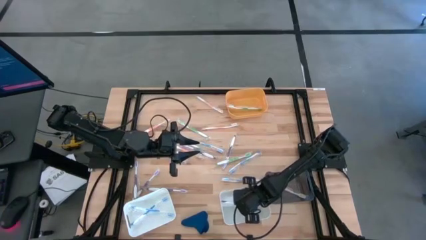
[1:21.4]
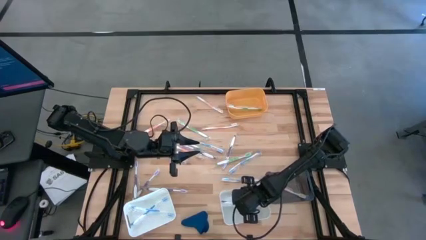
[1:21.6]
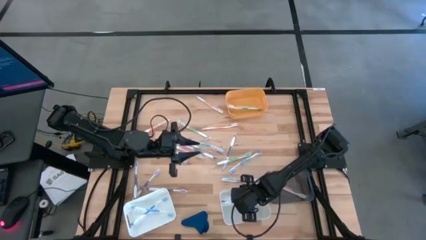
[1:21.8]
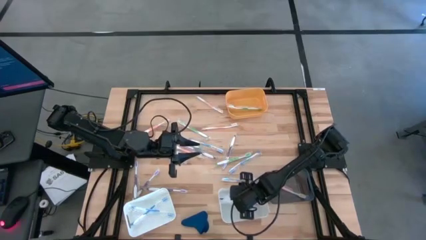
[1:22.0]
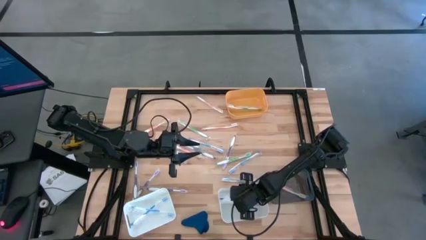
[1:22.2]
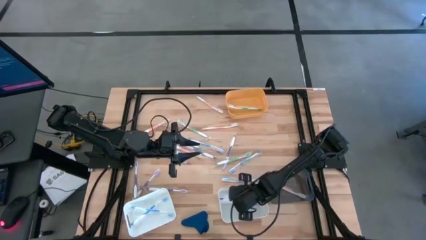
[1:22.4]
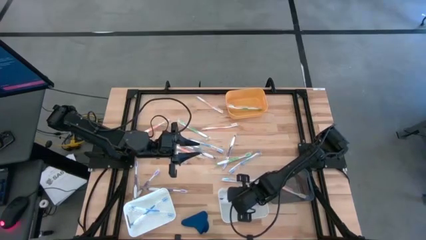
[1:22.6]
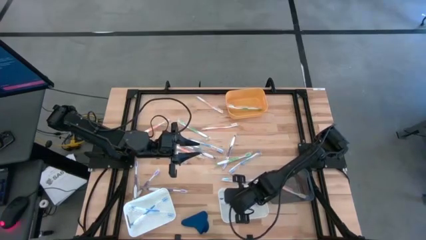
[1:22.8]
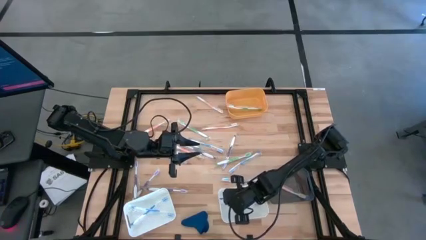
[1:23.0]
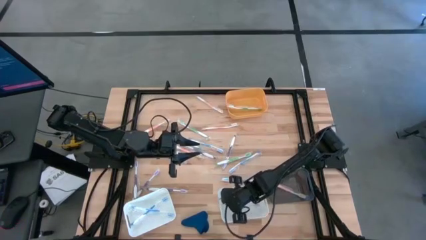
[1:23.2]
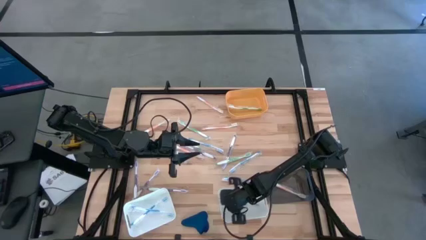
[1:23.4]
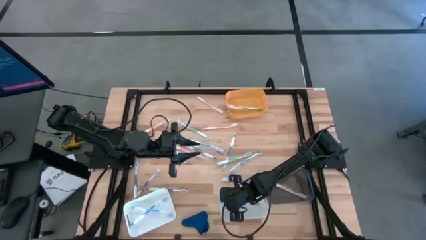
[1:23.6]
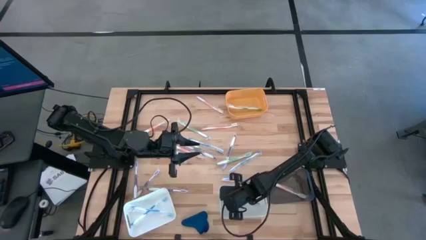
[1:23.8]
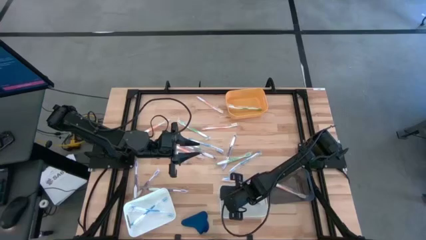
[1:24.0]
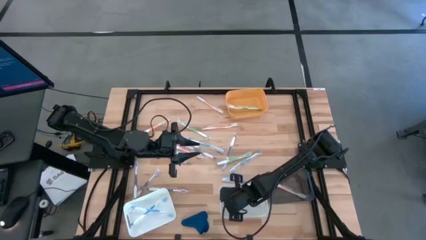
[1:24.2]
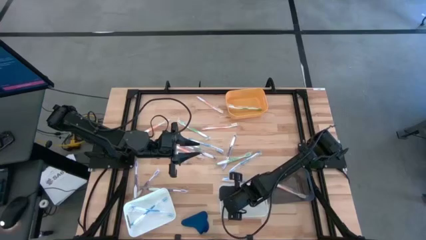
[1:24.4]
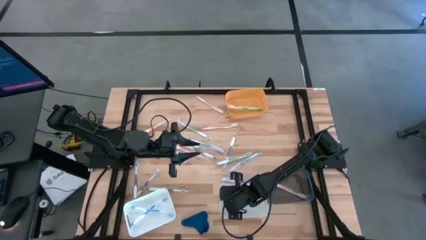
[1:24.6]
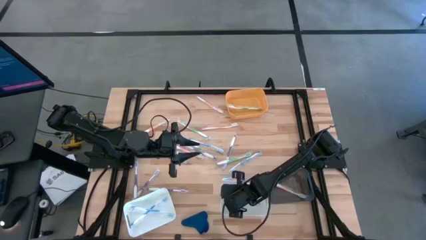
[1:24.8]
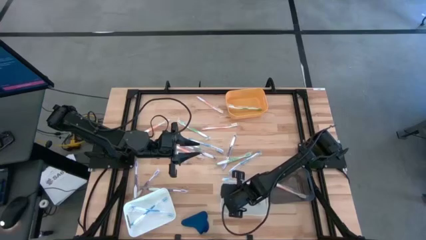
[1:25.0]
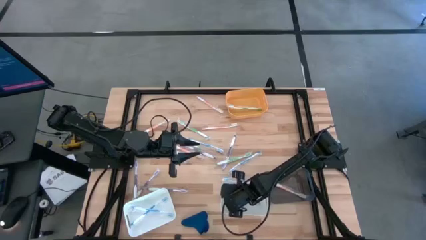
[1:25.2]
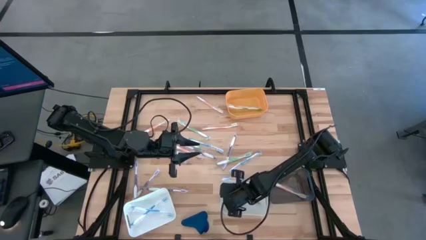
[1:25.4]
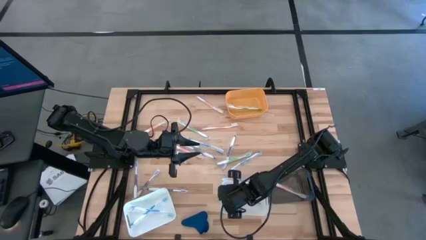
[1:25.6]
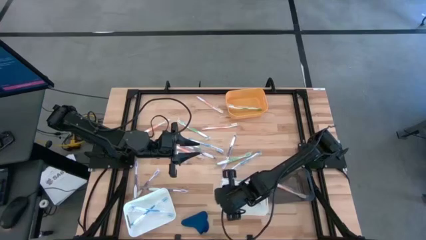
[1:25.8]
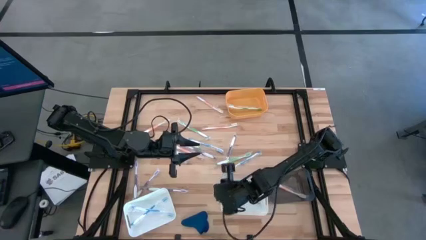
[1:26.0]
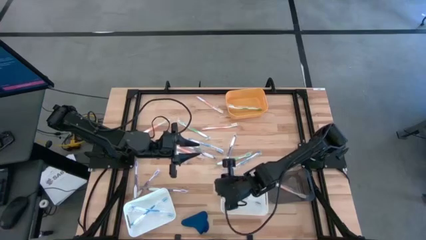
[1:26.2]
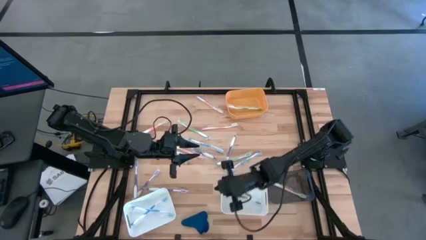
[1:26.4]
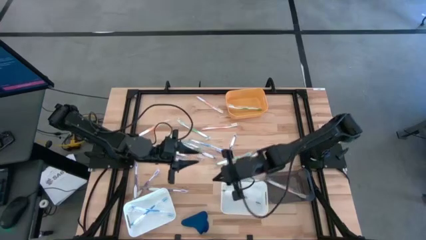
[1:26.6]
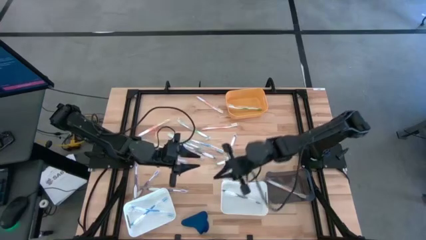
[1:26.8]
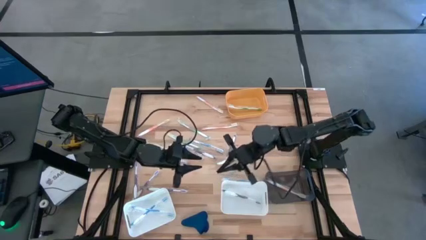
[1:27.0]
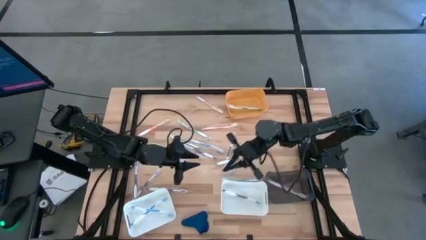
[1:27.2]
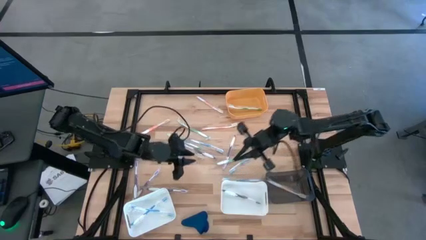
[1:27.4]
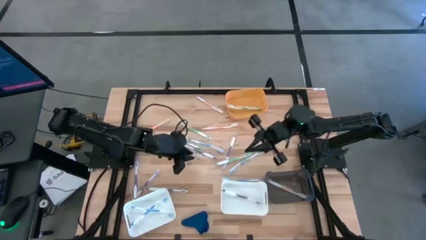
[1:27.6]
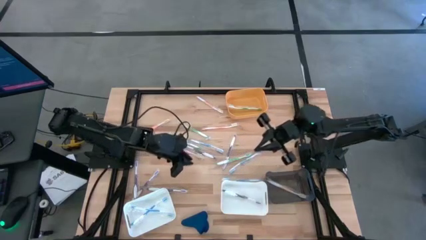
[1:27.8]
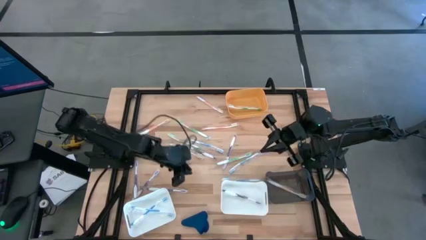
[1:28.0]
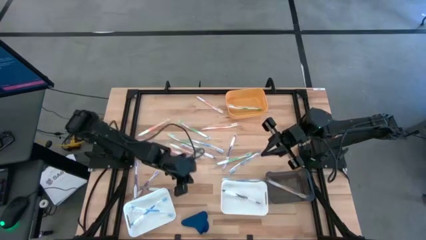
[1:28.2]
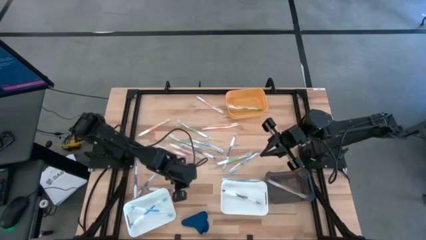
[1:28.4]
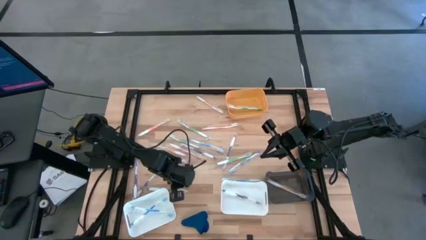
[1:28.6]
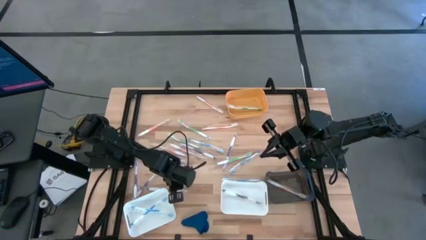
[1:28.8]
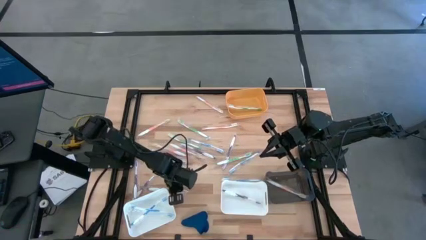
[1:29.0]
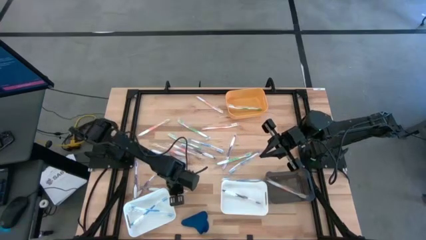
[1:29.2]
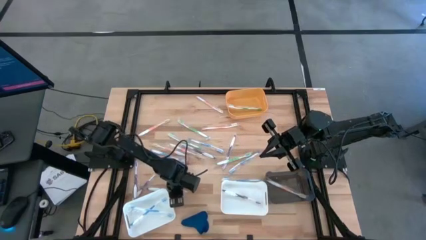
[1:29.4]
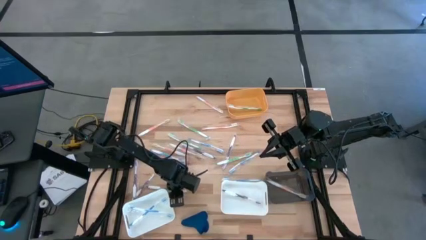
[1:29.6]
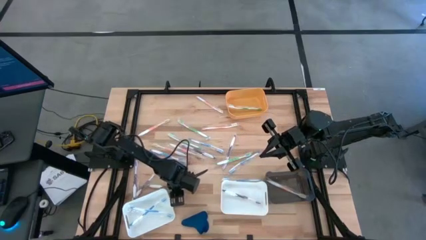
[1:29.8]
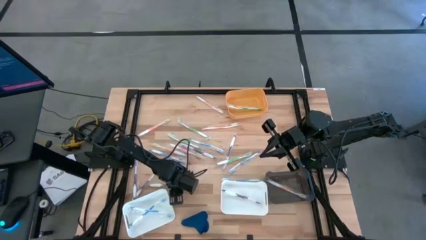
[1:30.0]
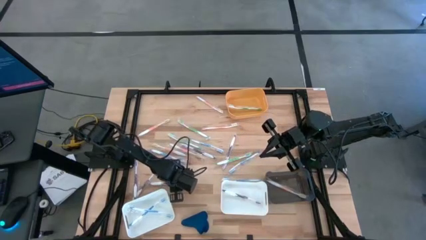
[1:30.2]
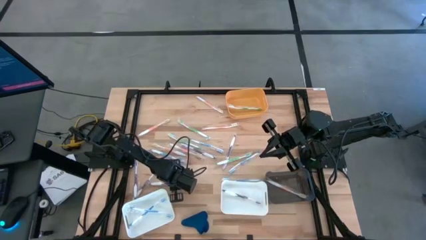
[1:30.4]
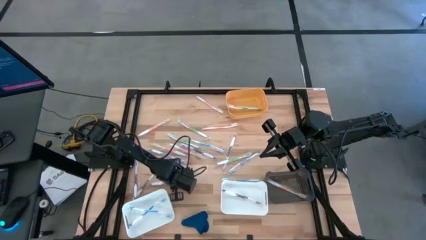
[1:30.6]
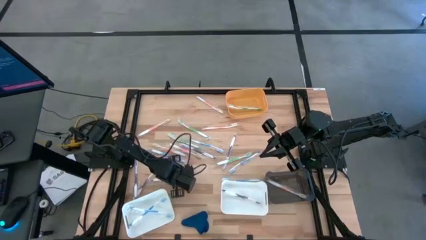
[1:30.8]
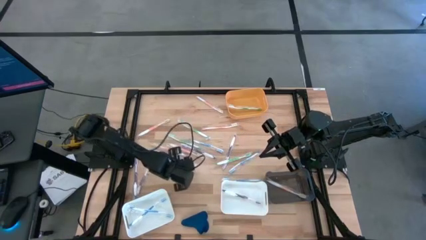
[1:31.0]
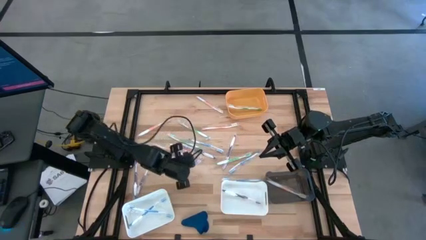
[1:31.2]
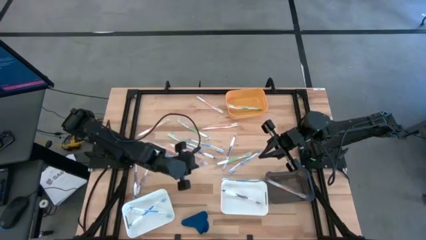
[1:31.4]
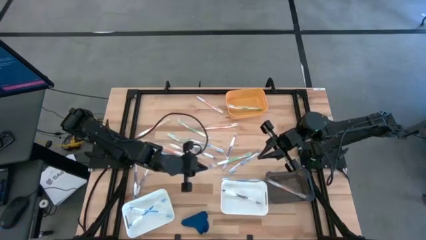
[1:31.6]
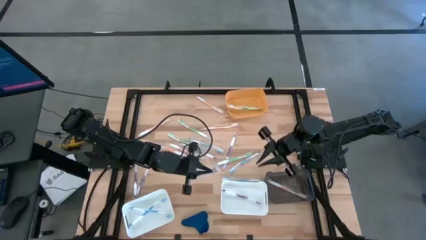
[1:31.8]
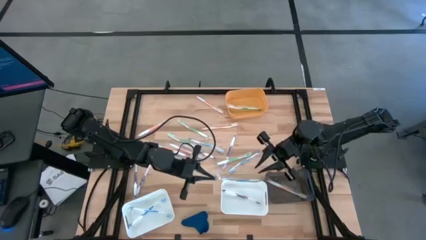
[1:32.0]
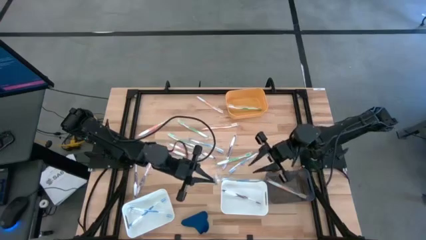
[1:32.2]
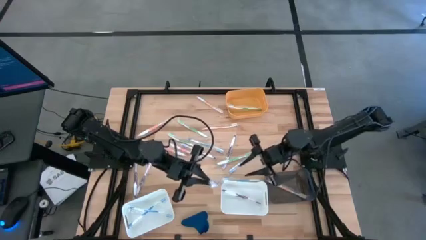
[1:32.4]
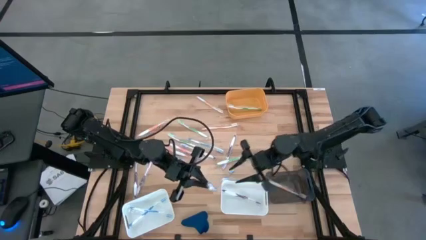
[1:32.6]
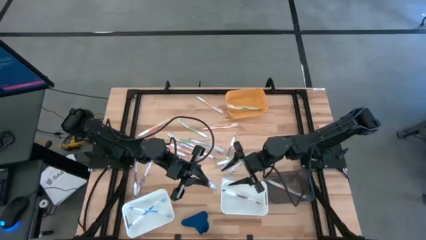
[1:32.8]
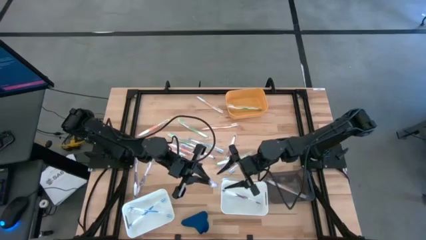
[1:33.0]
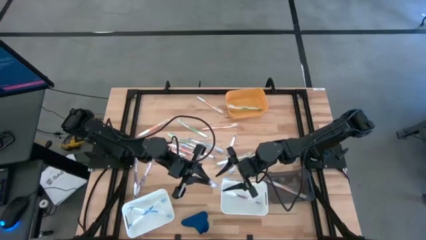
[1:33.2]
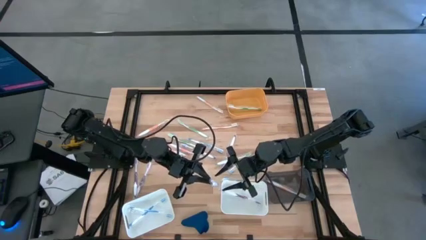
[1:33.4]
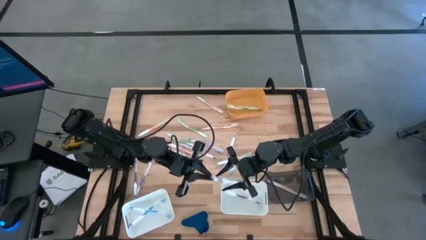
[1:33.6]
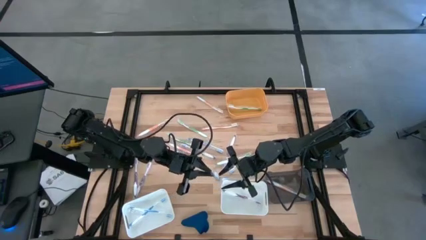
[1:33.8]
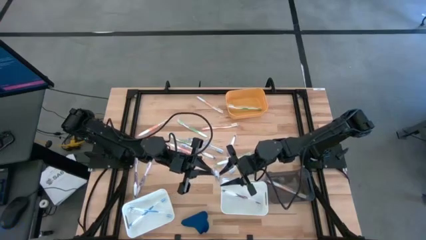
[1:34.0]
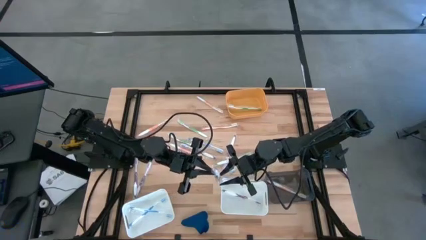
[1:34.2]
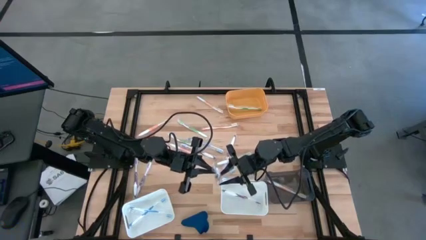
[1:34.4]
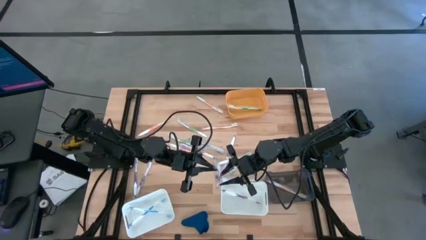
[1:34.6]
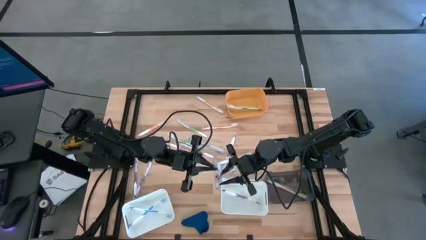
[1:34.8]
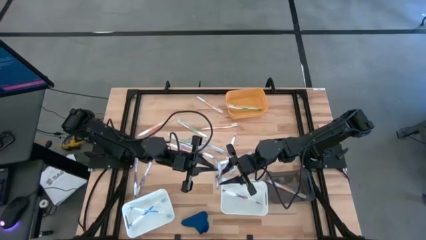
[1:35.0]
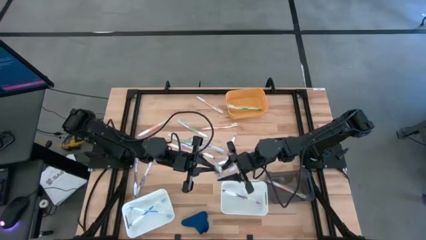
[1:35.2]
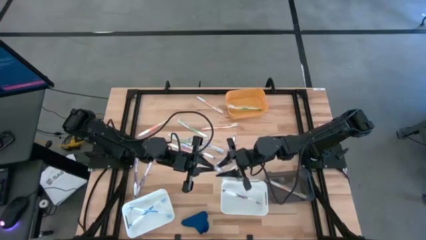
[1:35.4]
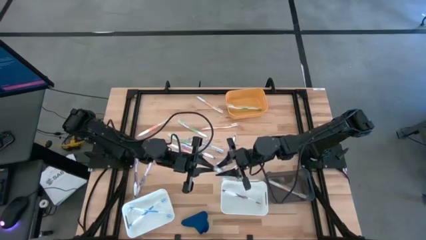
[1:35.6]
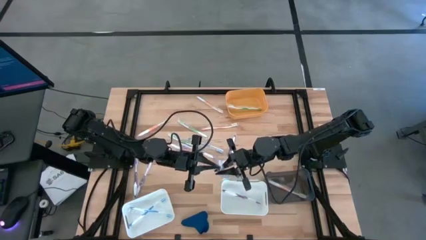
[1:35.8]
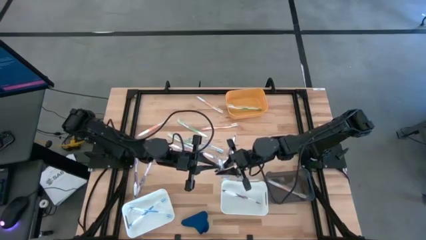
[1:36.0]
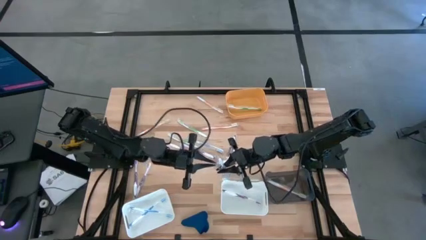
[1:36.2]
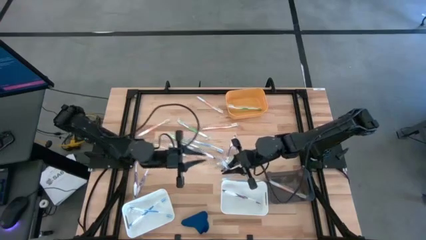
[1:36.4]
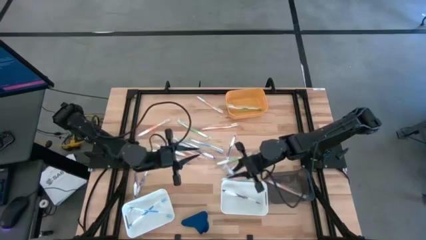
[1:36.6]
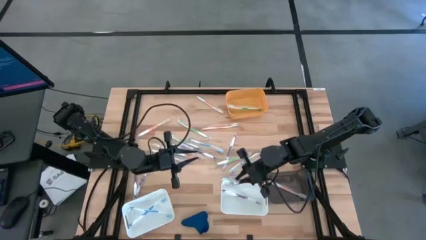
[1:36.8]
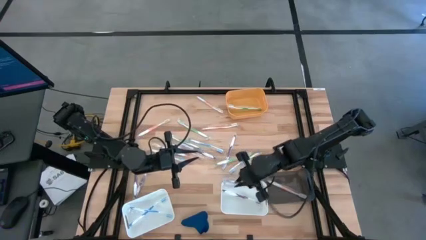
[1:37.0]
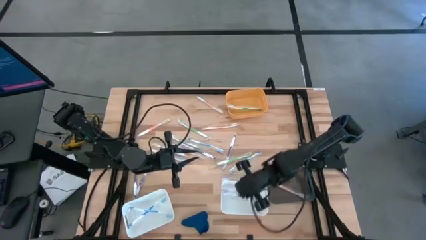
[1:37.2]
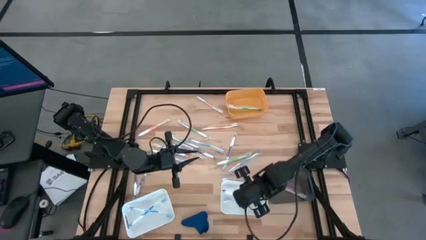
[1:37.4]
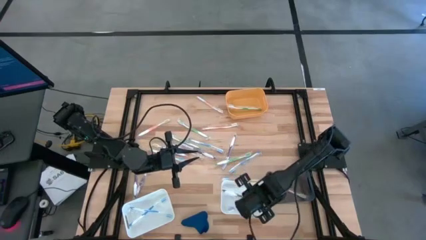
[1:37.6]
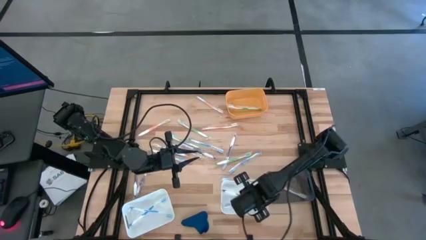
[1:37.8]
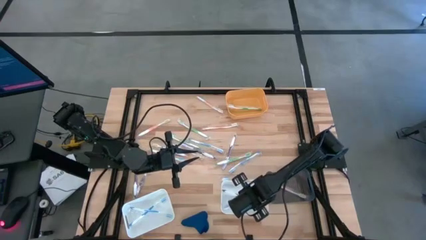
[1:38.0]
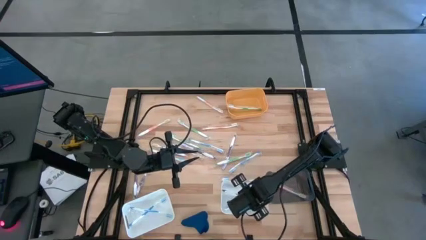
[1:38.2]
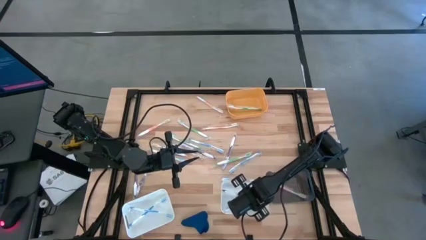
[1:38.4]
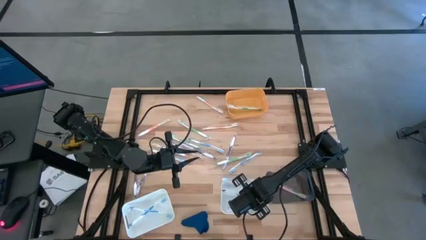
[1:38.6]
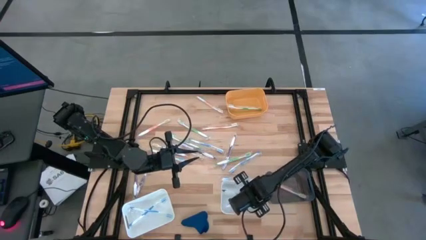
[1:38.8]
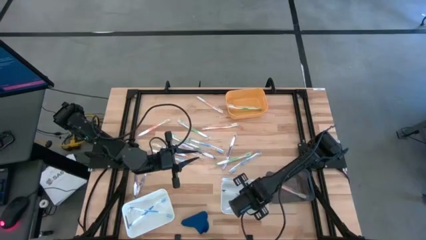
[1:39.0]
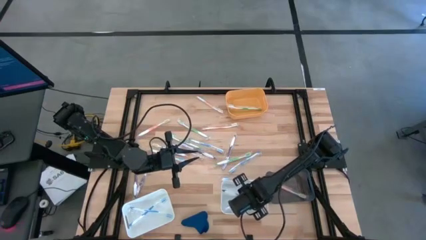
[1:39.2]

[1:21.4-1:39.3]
Task: Pick & Place Toothbrushes
Put the violet toothbrush into the right white bin
